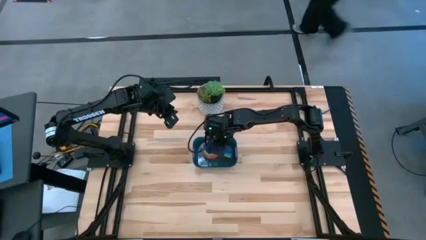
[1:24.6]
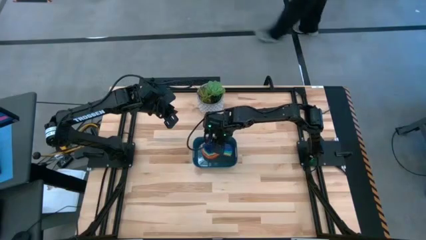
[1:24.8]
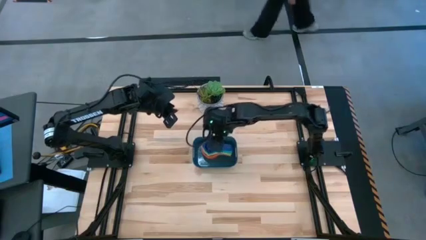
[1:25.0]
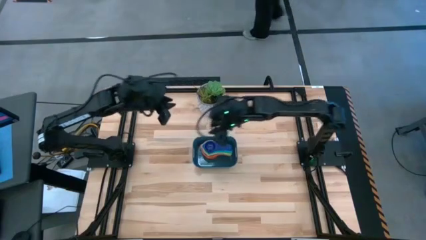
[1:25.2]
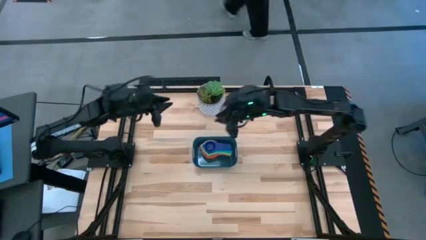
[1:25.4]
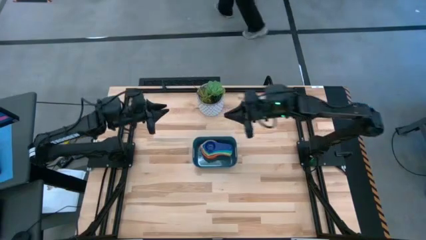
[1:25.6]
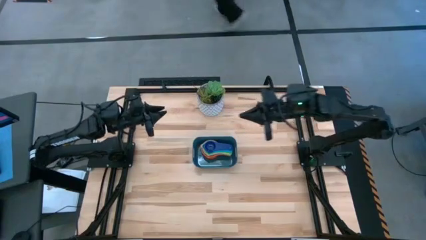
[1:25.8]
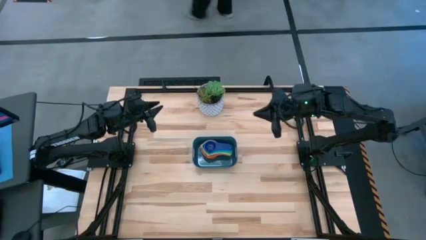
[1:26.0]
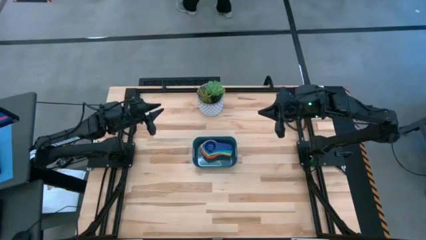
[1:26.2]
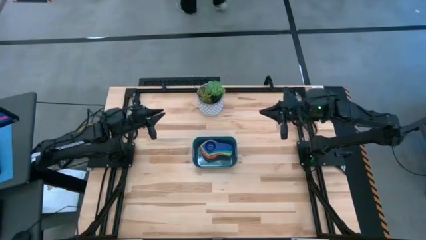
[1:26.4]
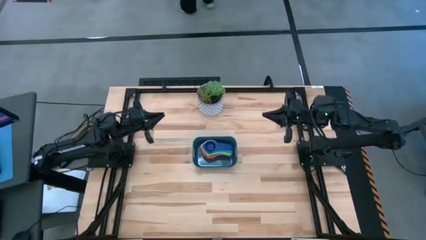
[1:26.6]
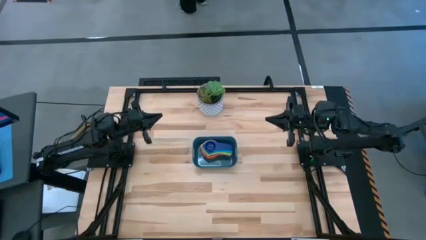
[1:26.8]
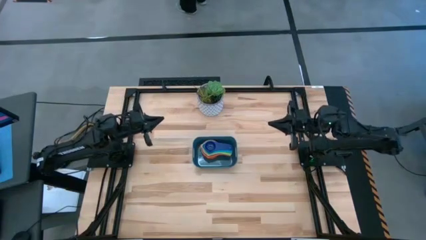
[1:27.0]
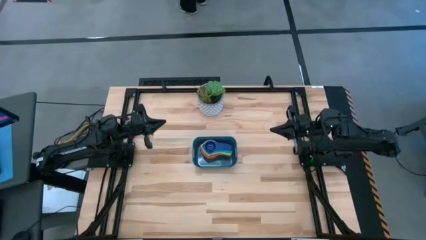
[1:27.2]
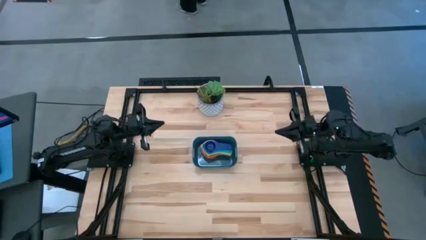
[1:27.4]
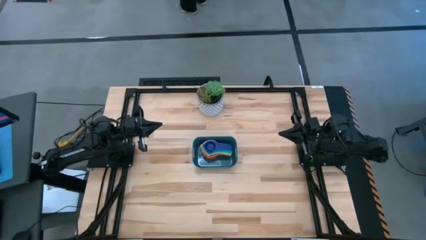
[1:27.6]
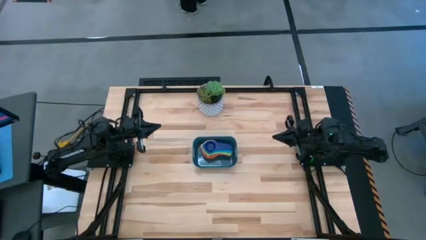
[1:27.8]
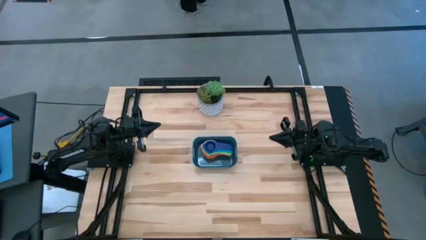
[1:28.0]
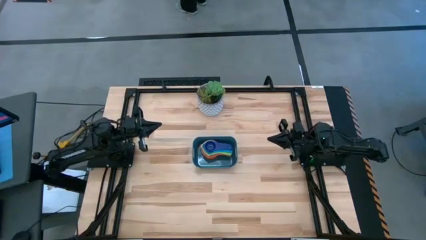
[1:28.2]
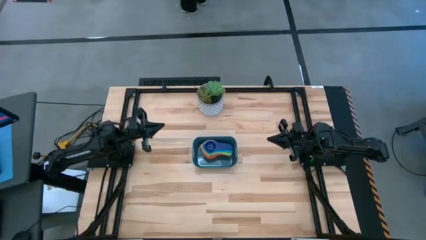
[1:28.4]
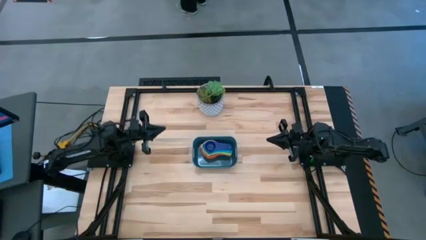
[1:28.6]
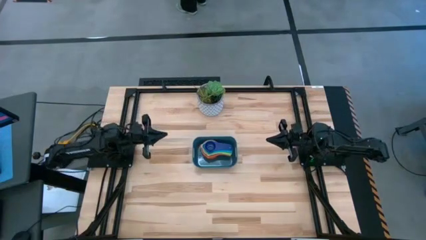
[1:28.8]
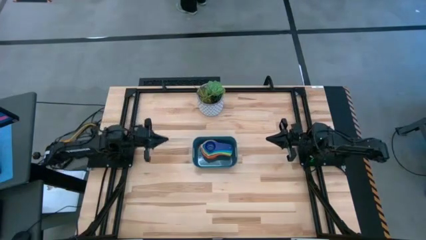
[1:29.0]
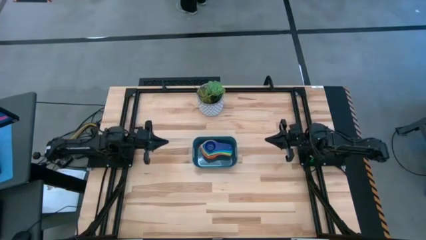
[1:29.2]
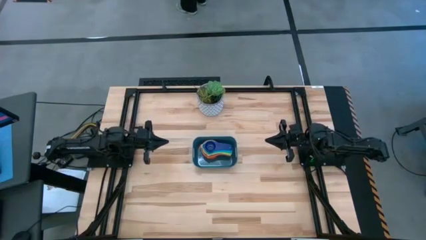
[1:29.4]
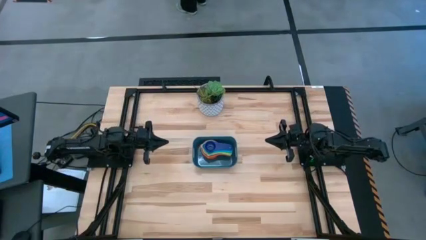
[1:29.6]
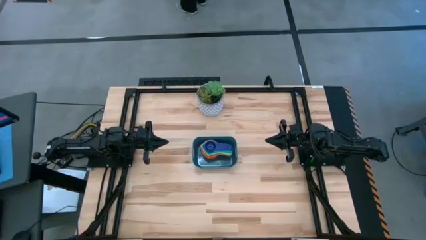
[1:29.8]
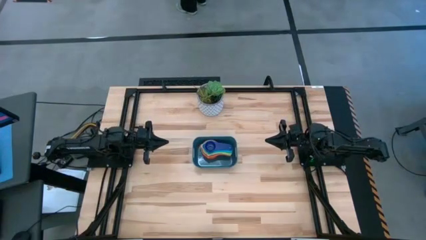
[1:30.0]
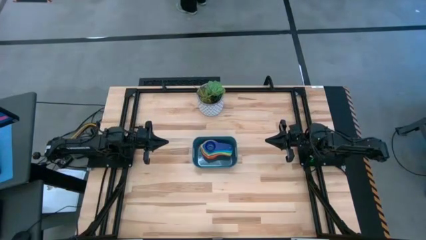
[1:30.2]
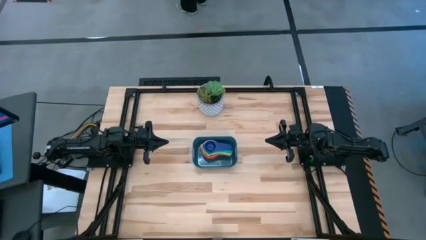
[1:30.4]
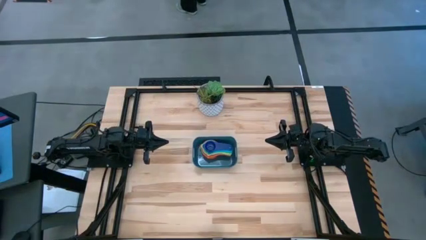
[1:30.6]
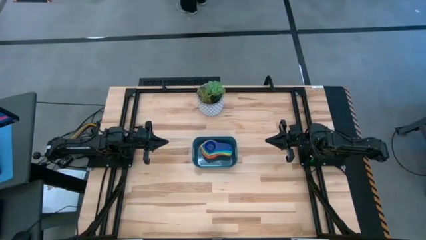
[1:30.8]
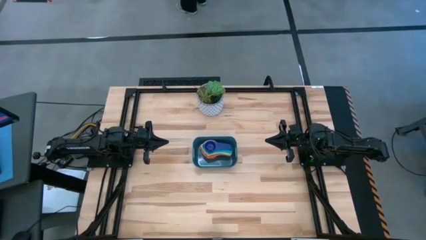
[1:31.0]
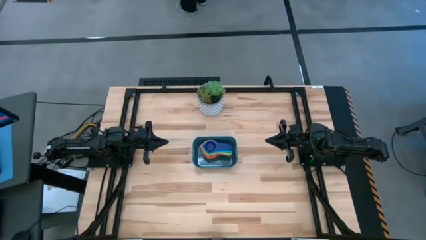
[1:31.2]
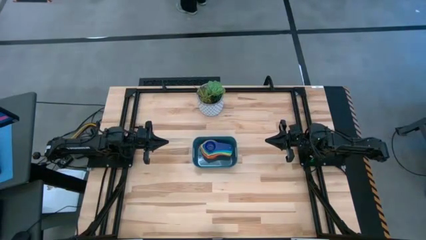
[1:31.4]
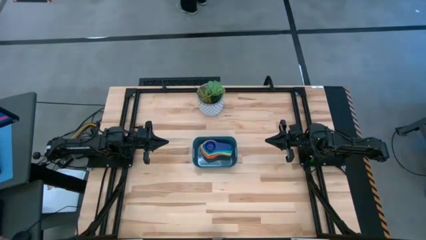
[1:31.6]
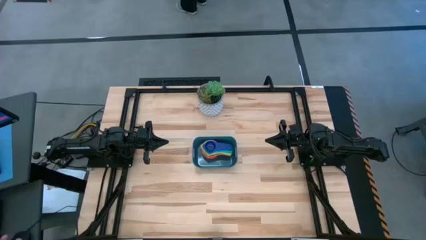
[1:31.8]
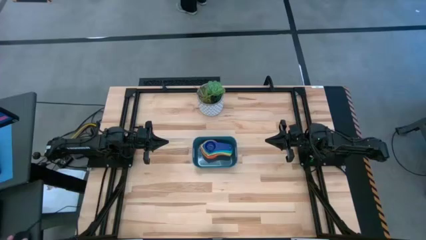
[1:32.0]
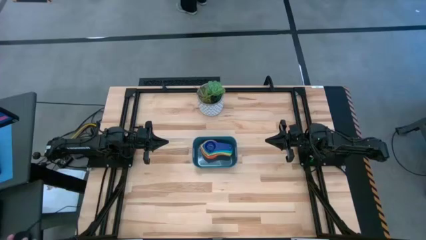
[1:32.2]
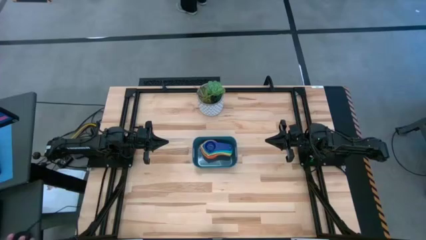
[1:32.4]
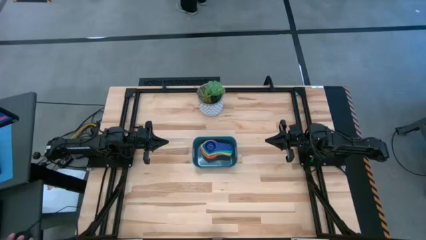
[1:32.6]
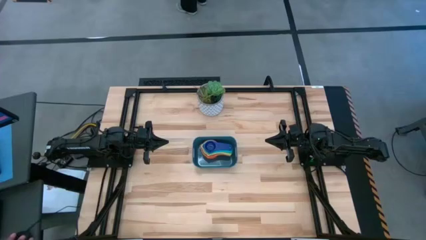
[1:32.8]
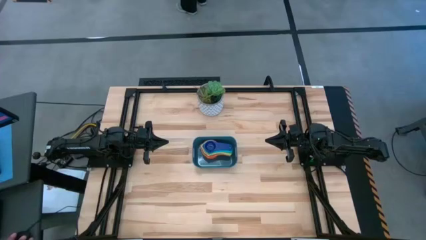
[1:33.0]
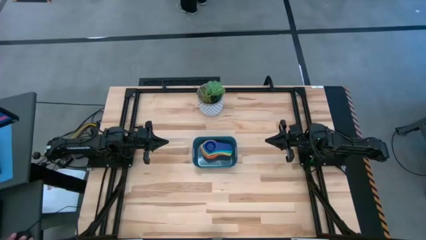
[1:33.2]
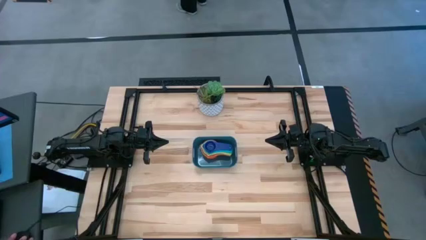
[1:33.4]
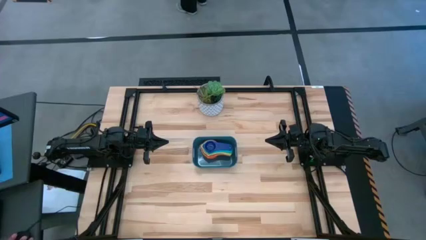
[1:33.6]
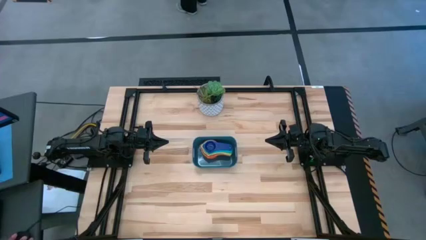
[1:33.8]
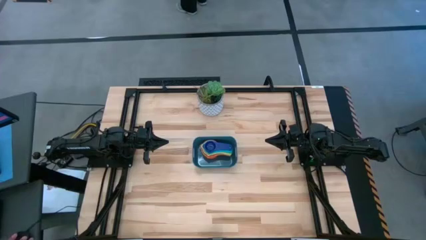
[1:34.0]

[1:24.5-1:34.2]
Task: Nest measuring cups in basket
Return to Home Position

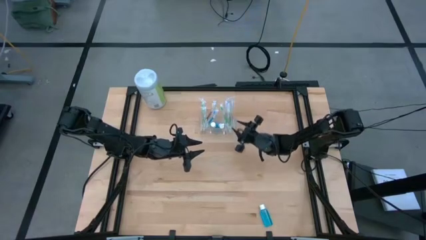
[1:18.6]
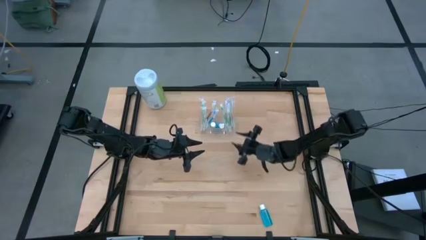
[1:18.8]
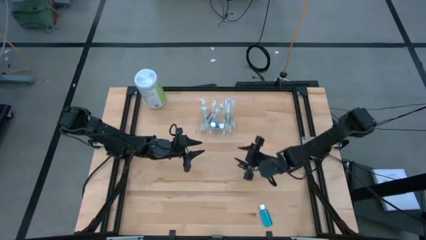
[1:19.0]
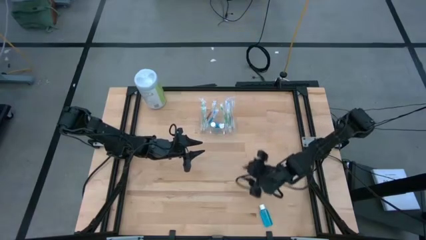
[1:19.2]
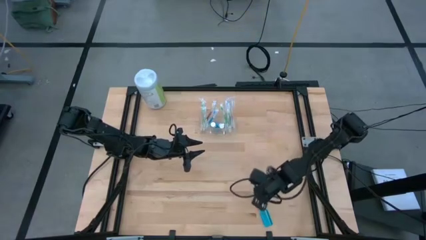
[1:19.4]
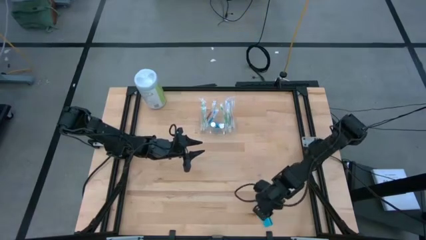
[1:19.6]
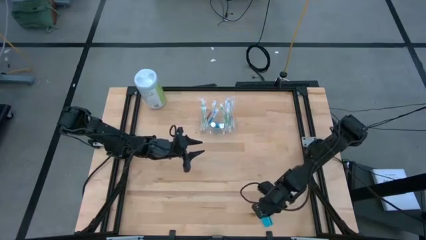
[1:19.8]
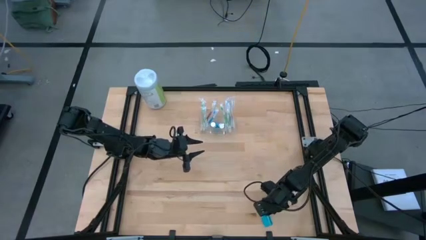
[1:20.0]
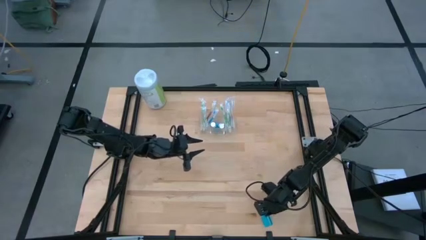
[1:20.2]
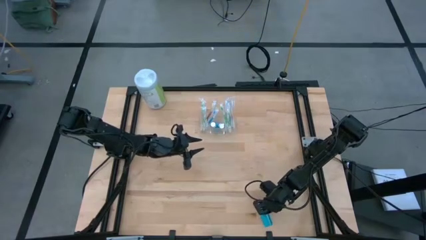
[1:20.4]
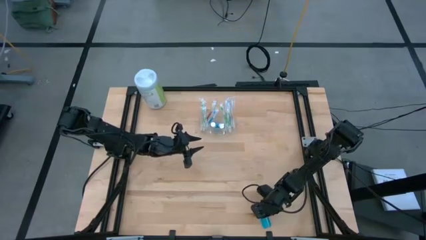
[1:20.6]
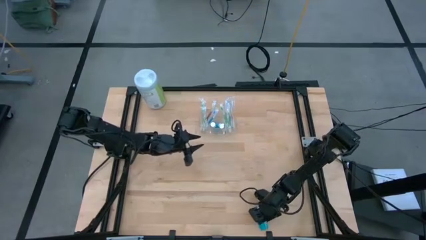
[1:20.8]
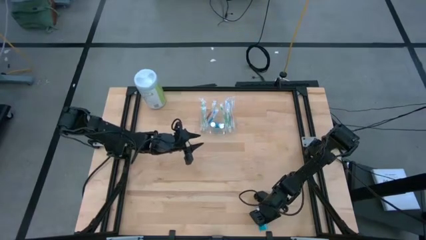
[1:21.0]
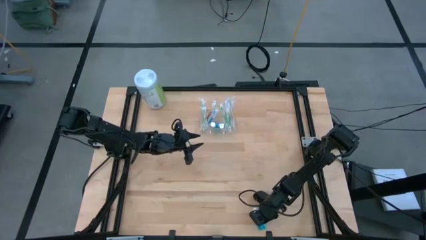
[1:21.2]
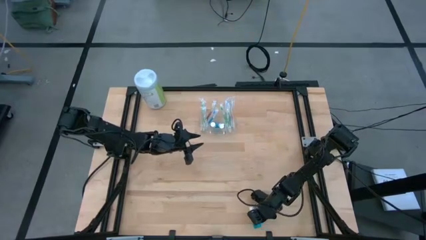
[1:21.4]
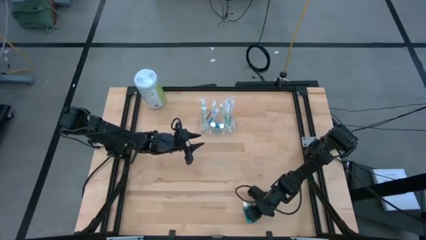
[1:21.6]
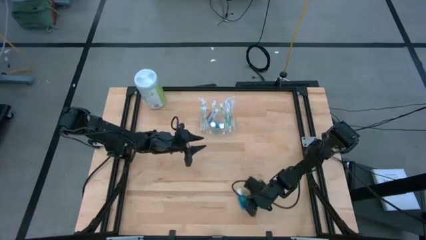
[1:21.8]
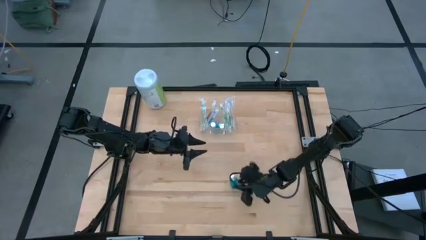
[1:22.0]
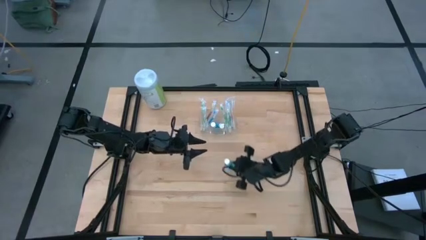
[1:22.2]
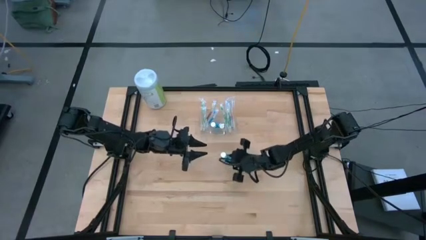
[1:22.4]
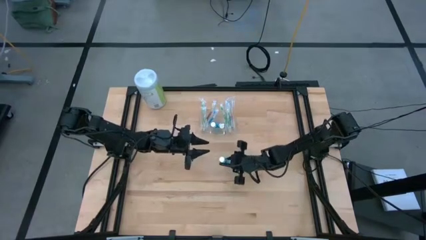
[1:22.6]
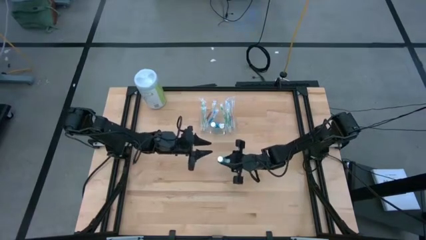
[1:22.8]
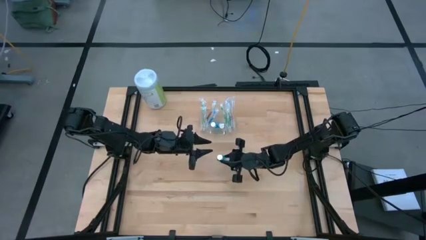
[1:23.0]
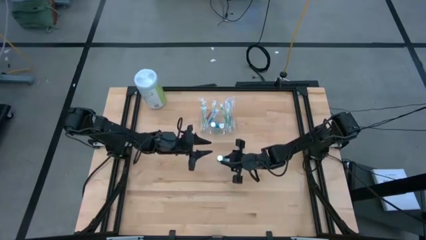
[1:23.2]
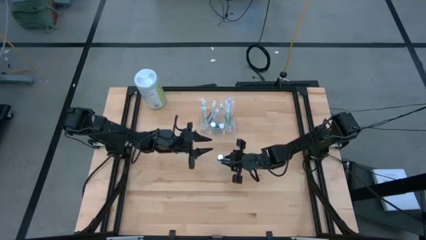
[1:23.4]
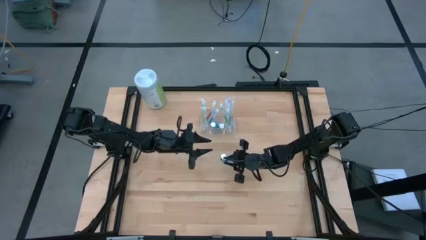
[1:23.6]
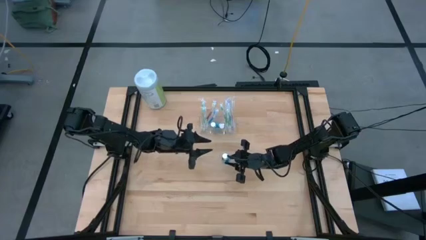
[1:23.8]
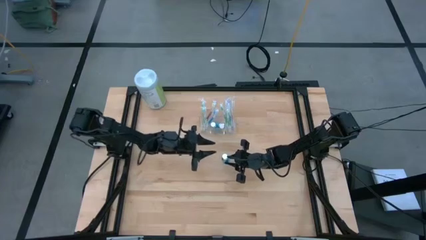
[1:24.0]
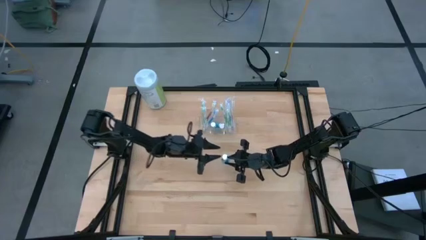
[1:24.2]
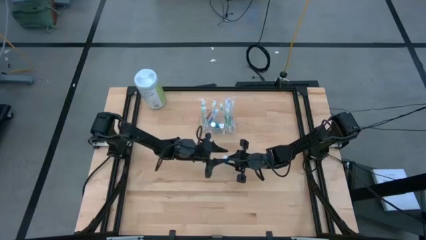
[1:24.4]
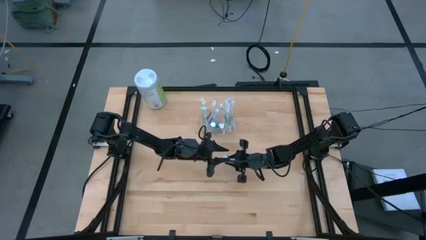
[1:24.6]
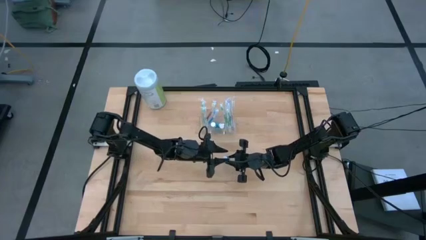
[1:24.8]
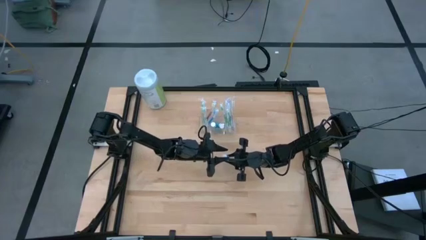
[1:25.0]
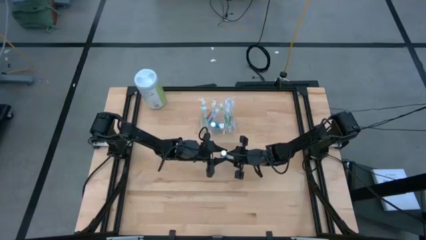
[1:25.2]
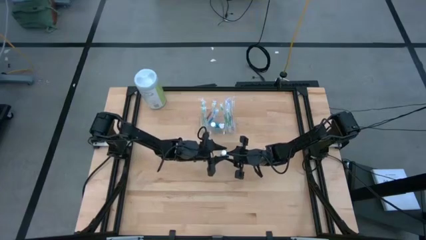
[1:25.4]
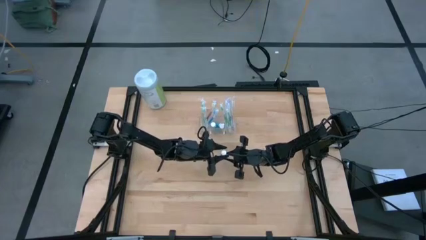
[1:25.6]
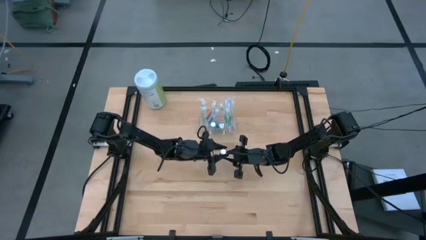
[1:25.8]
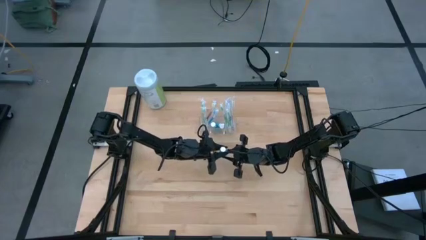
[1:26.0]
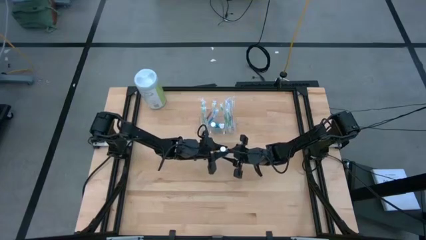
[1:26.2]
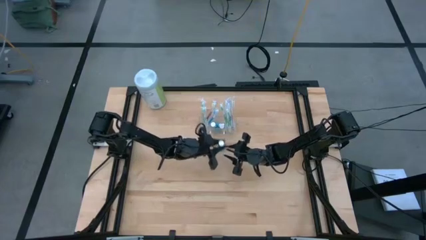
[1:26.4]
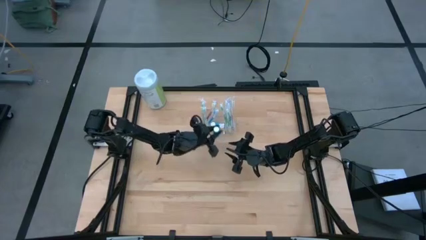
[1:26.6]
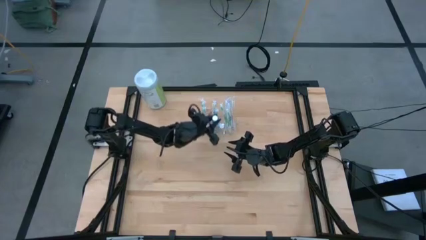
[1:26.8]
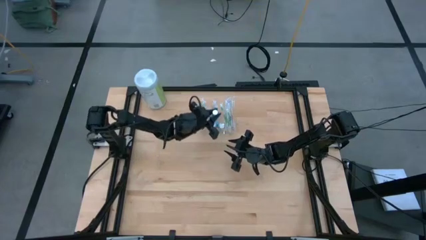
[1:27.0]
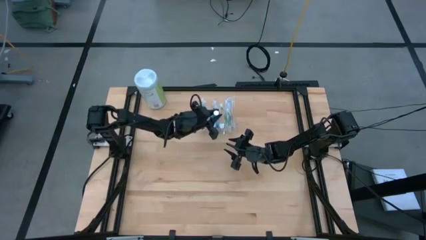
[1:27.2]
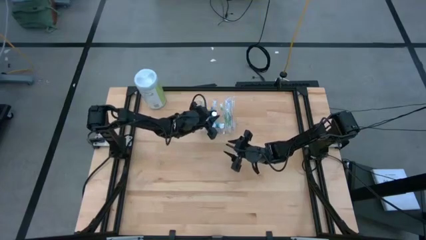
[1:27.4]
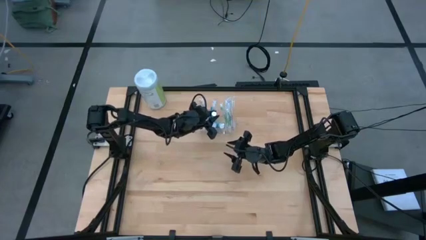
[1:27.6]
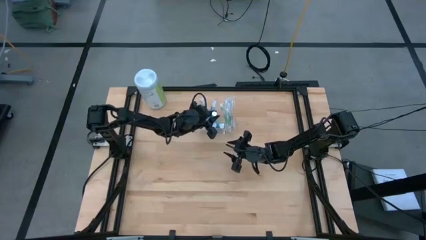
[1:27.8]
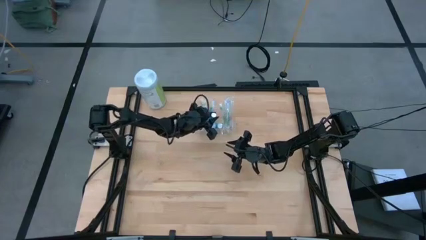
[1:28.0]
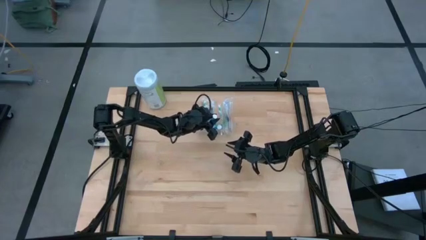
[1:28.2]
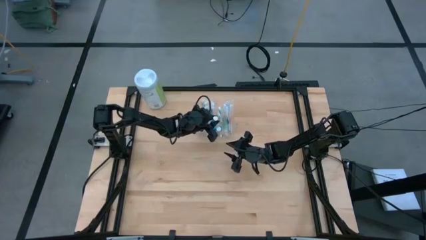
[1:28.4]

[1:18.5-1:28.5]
Task: Pick & Place toothbrushing station
Put the blue mouthwash in the middle of the transparent organizer
